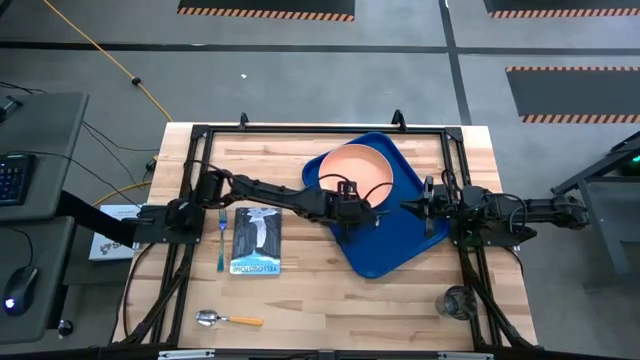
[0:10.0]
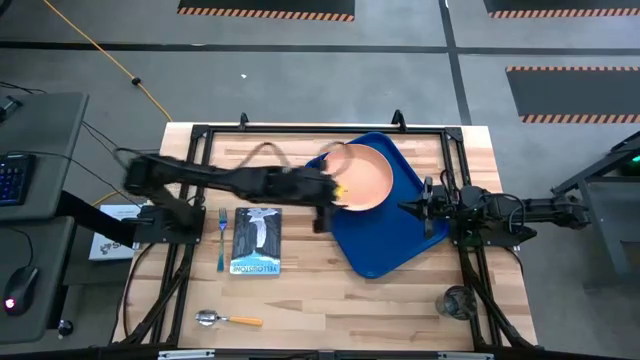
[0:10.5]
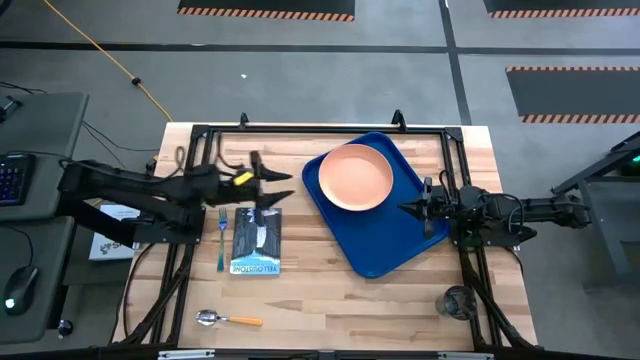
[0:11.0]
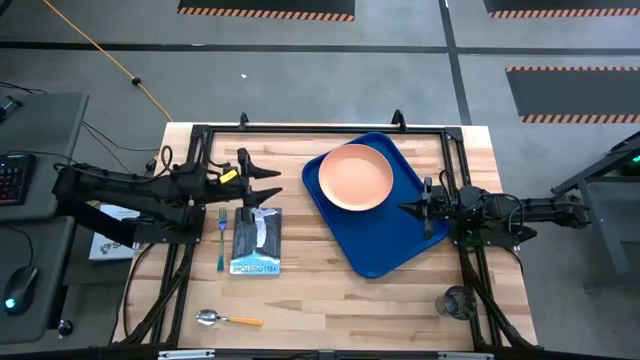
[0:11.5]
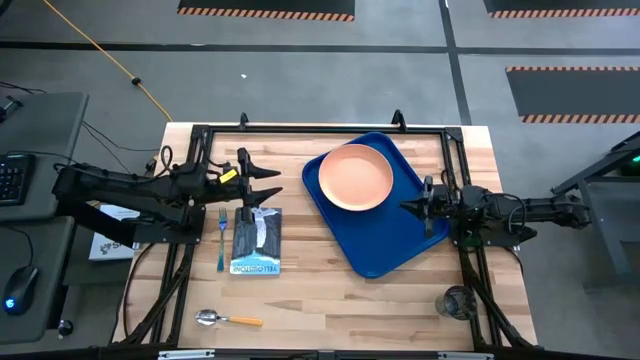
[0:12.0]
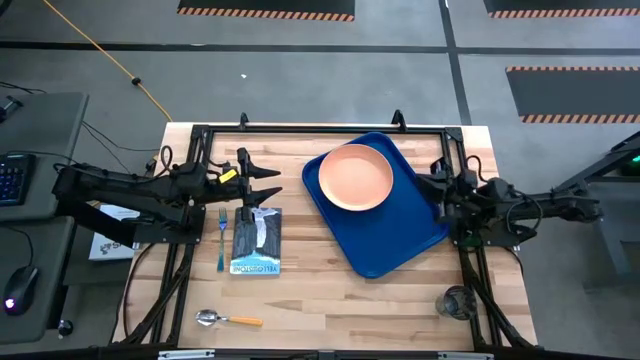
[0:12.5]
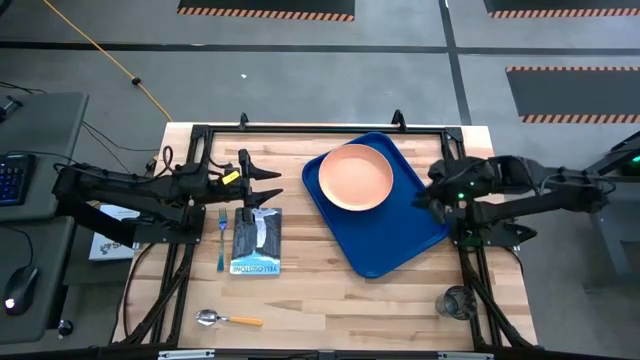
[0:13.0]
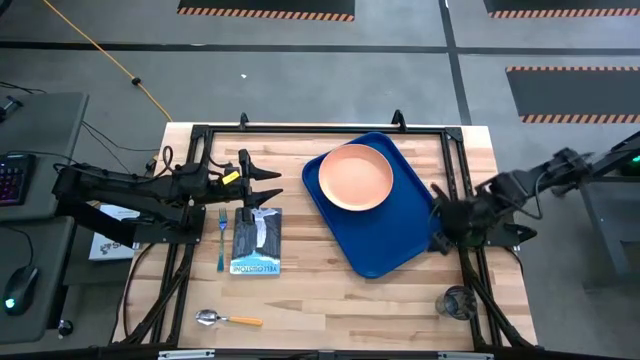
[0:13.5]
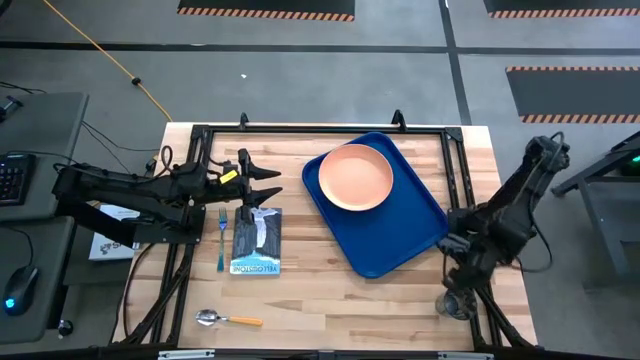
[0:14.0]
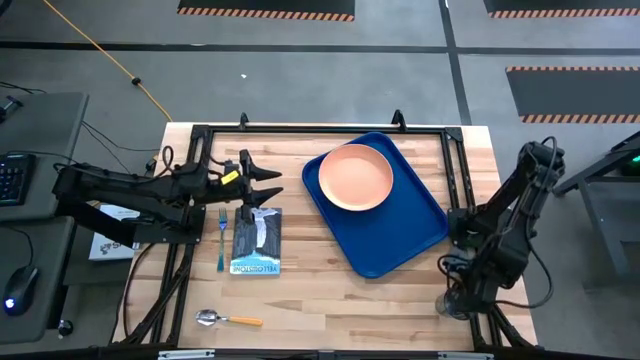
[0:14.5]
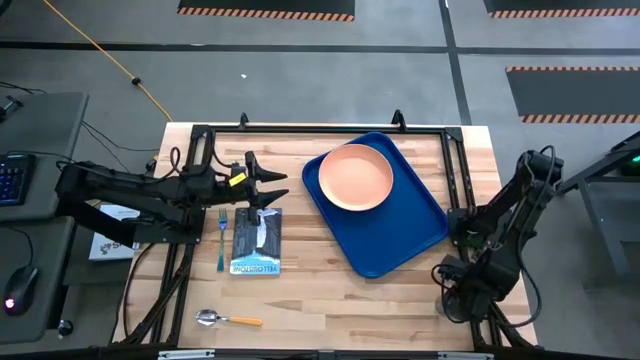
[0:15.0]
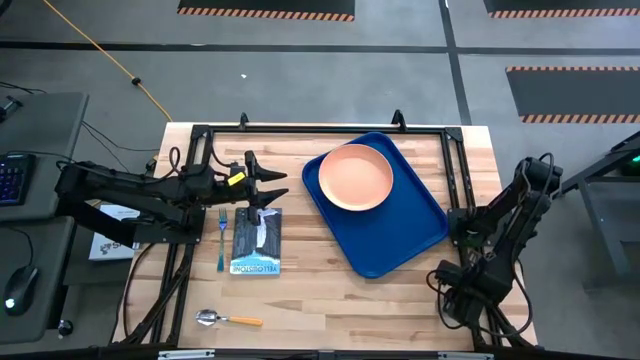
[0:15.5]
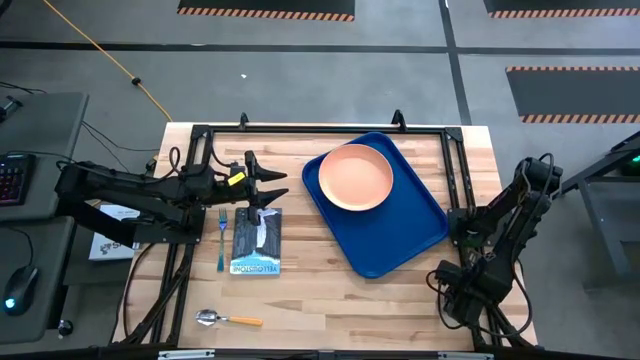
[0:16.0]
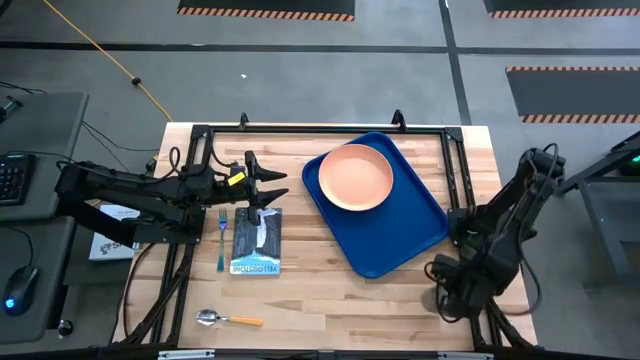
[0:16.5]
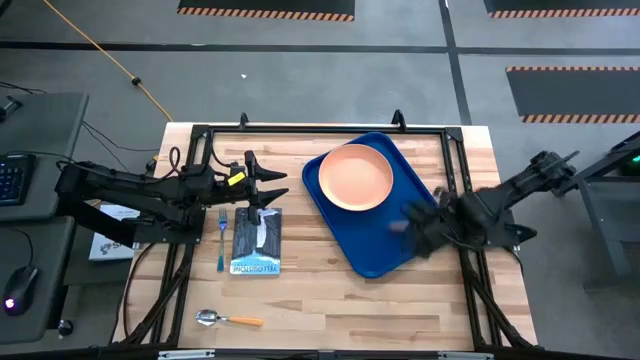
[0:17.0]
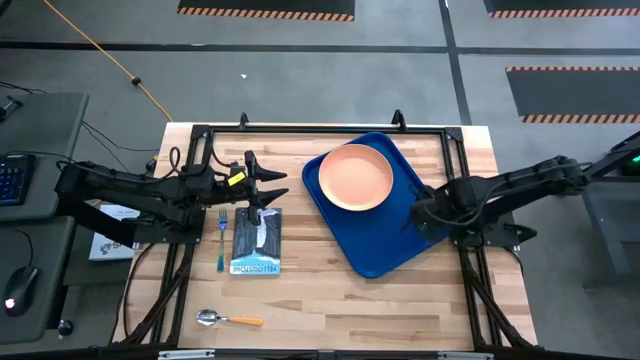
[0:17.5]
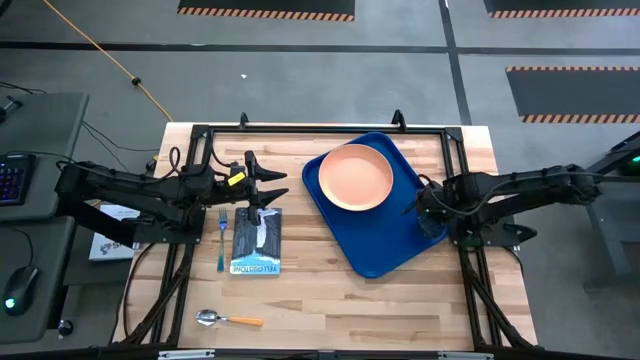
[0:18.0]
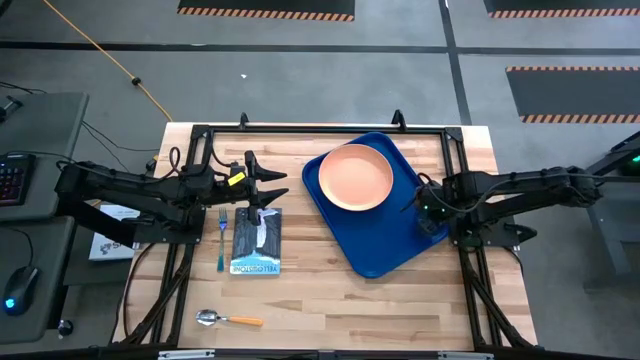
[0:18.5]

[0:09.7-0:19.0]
Task: Pick and place plate/cup/fork/spoon on tray
Put the black cup on the blue tray

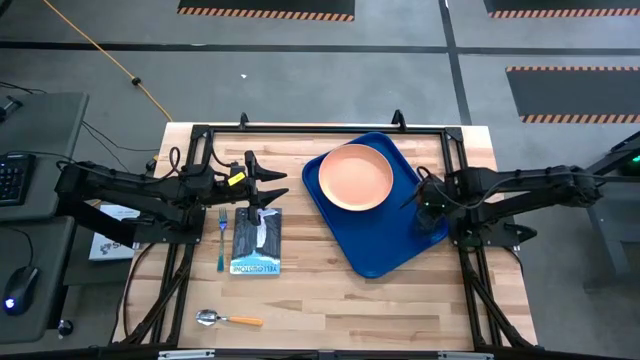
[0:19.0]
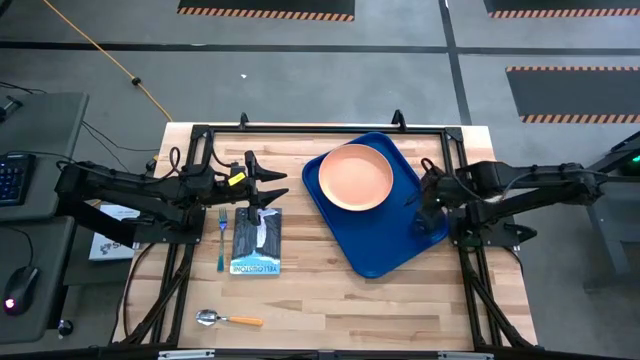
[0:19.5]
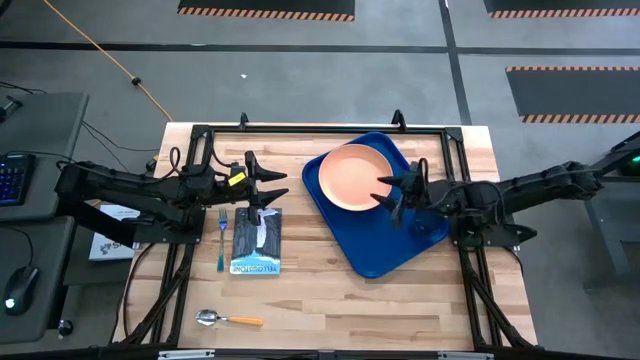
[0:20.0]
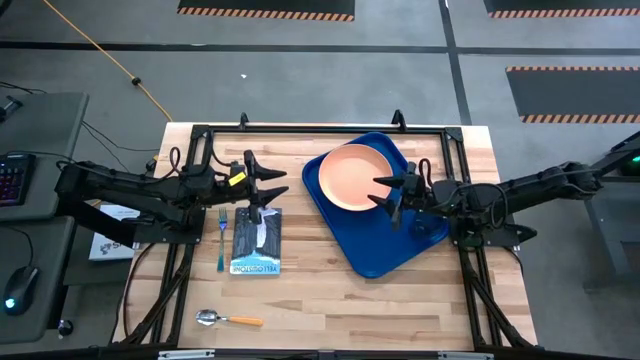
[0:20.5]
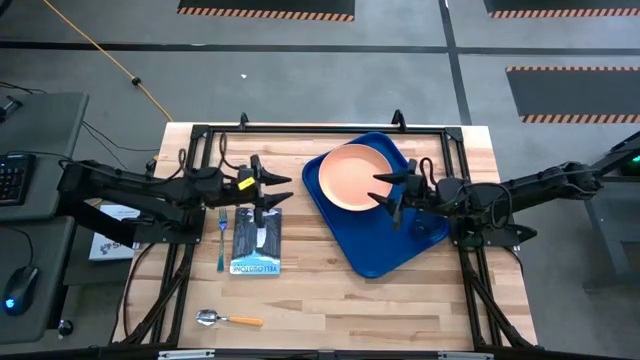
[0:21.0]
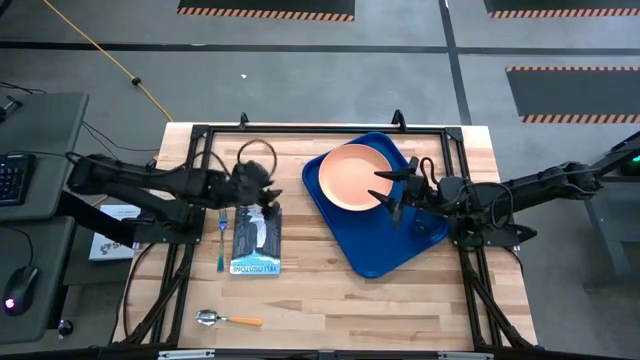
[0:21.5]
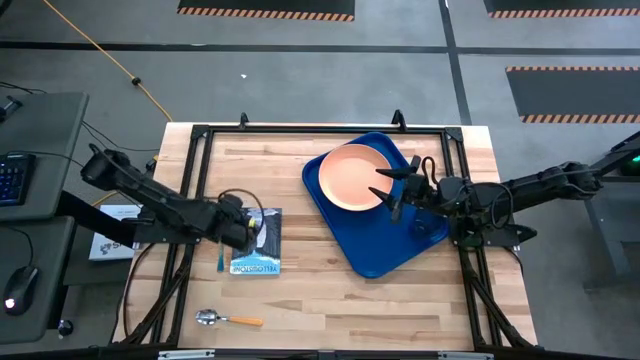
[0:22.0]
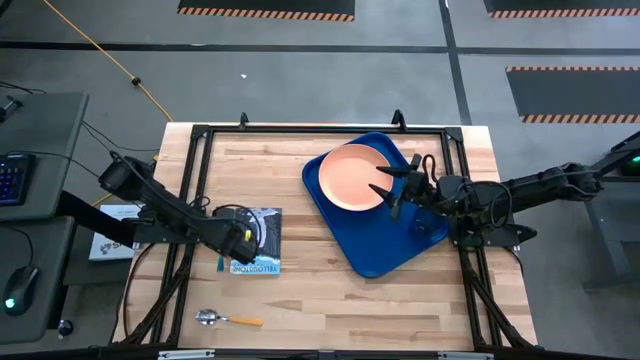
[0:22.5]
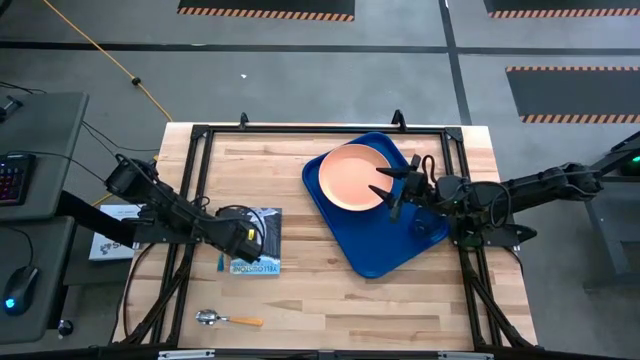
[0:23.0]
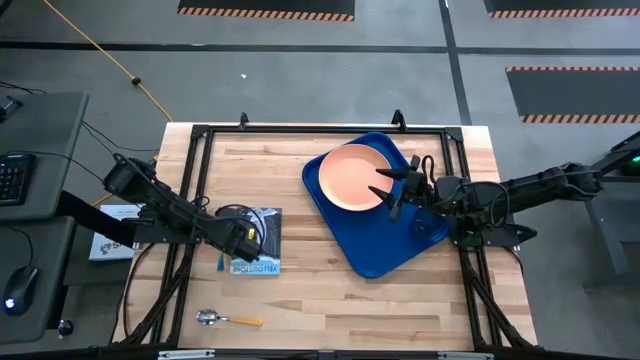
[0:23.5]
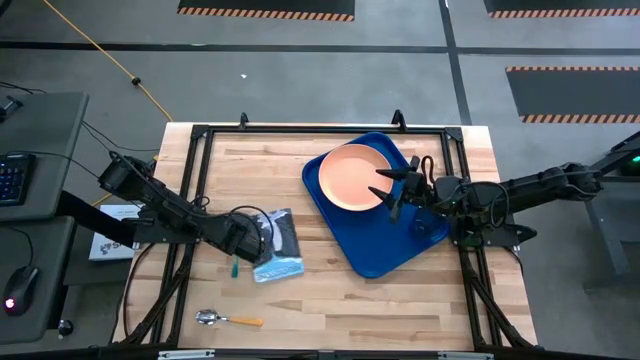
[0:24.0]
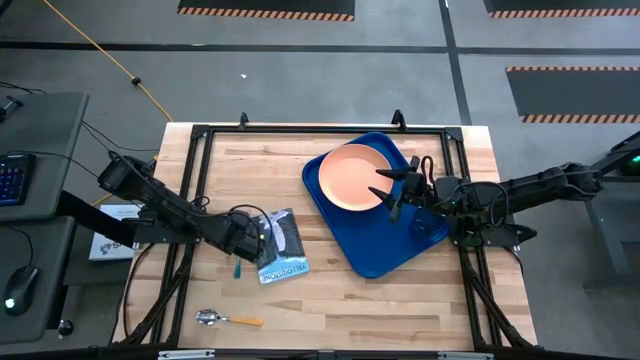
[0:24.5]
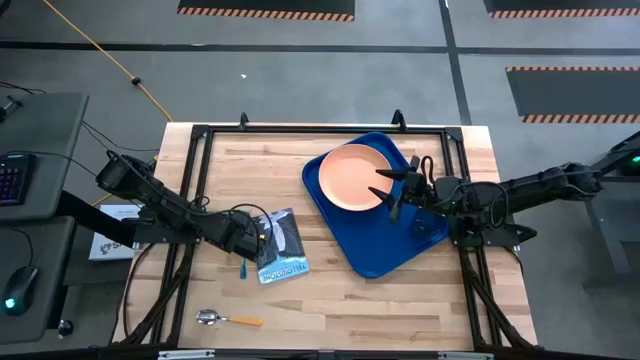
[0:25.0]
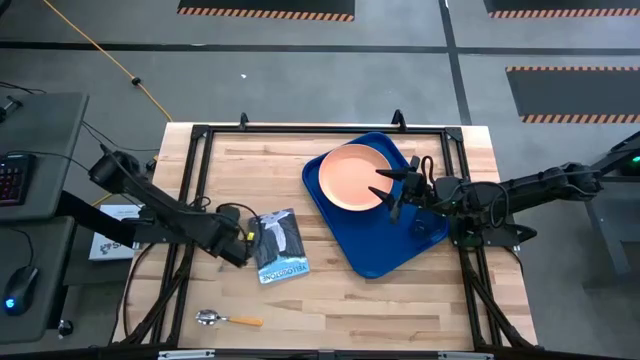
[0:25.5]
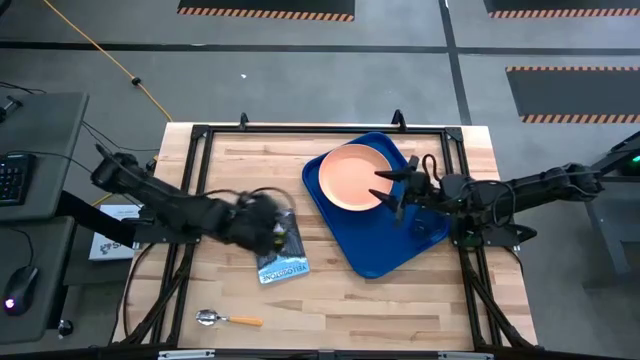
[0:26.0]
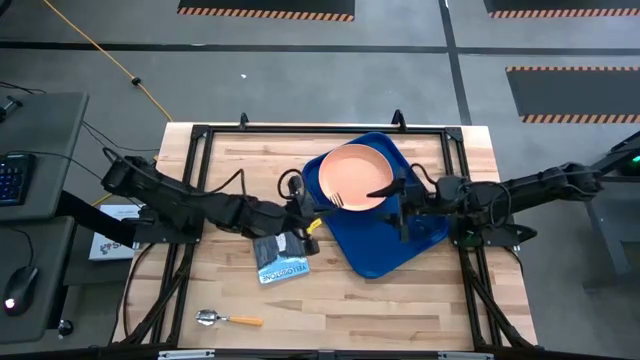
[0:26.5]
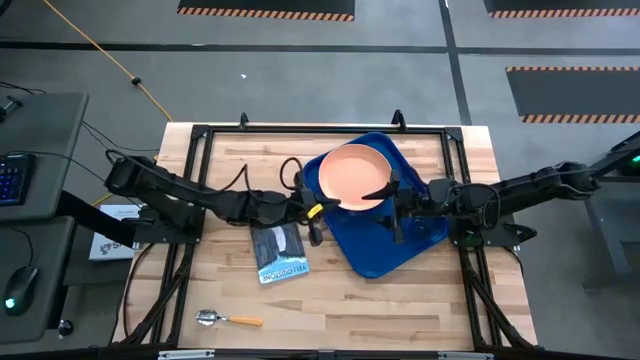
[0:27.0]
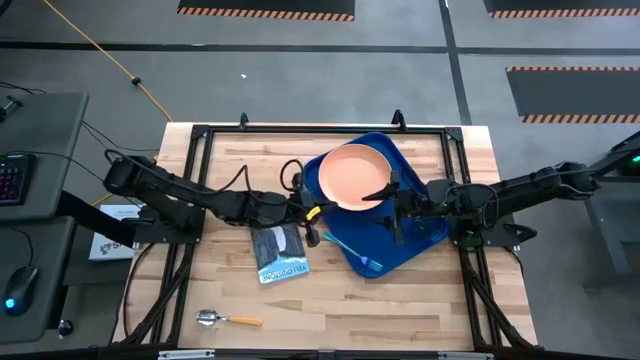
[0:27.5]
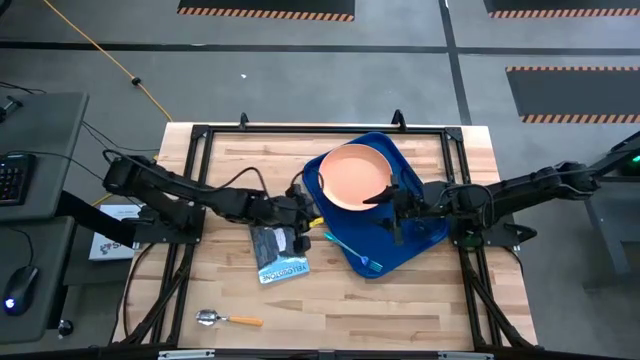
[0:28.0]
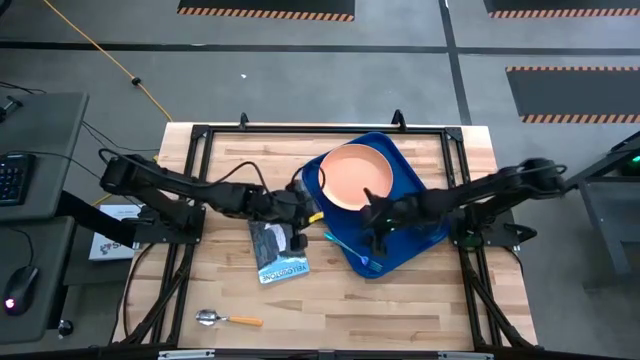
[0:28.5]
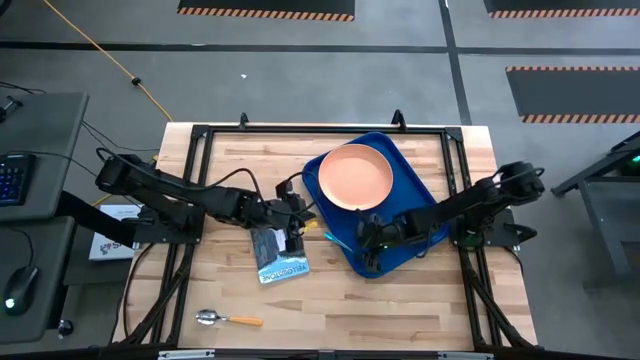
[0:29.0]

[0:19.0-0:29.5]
Put the iridescent fork on the right side of the brown plate on the blue tray

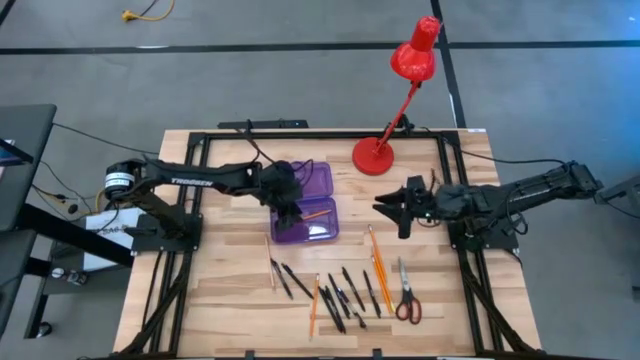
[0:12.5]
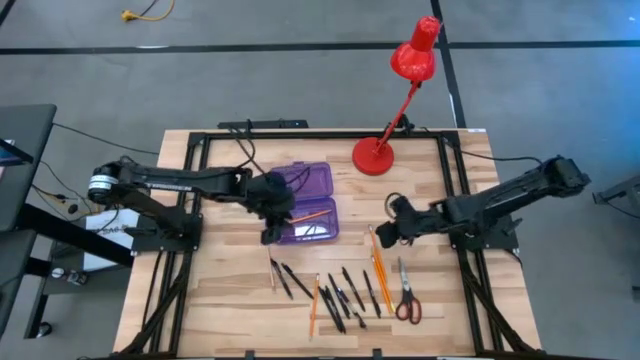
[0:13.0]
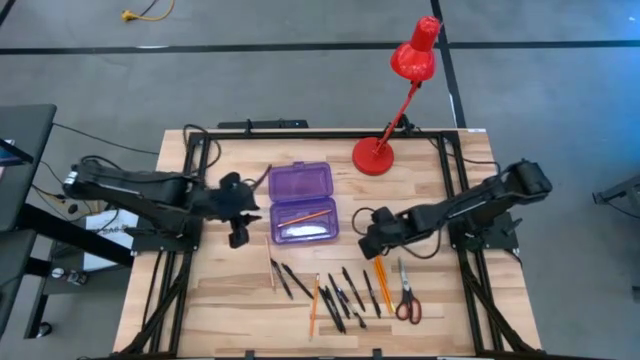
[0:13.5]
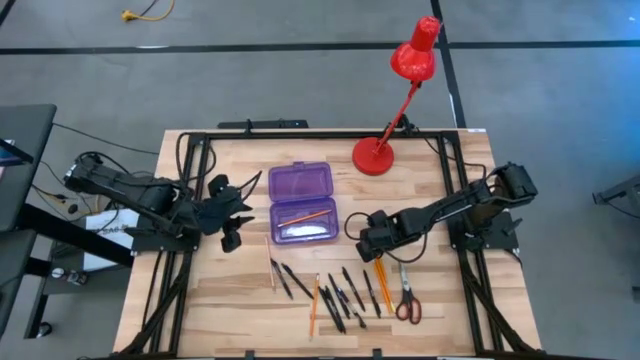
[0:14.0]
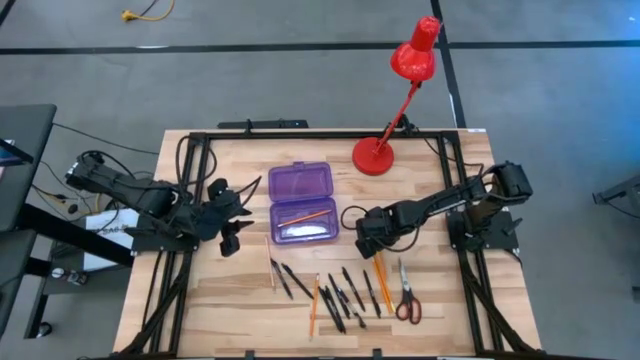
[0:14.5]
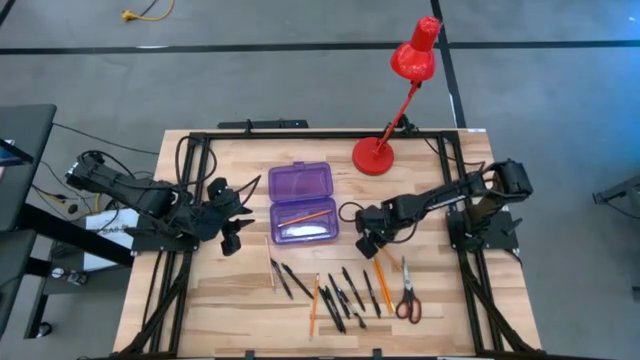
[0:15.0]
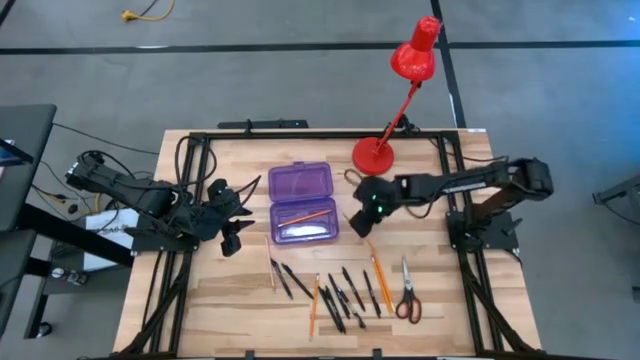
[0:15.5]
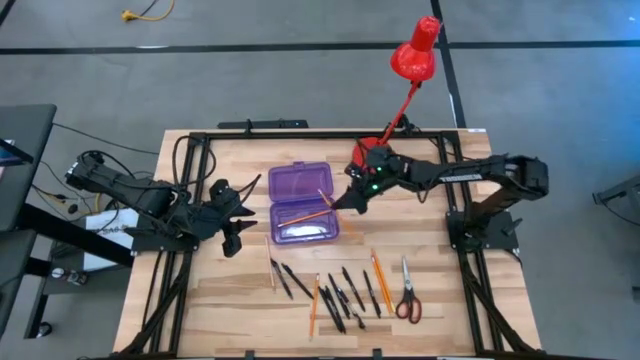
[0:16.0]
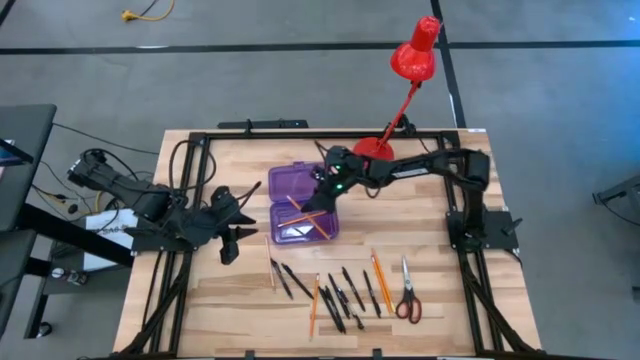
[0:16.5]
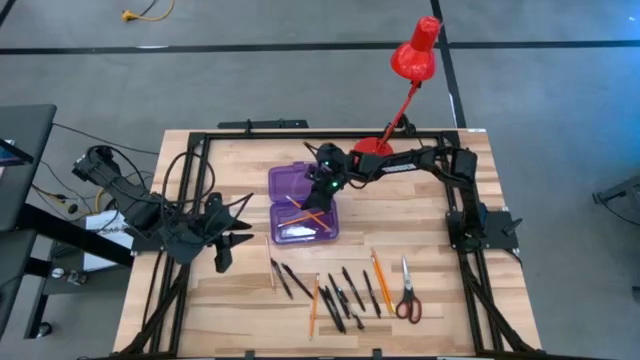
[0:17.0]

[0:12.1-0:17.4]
Task: Pick & place school supplies into a supply box
Put the orange pencil into the purple supply box
